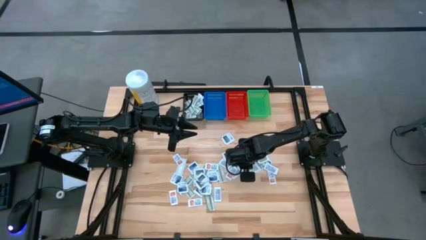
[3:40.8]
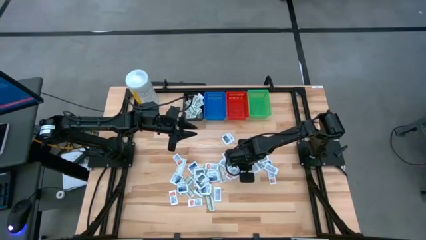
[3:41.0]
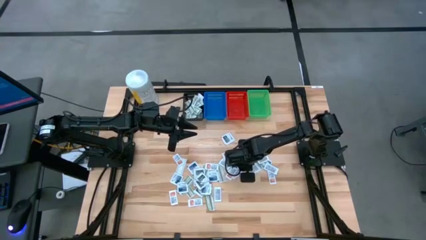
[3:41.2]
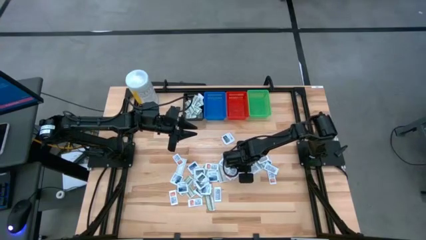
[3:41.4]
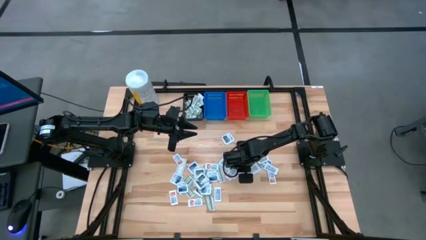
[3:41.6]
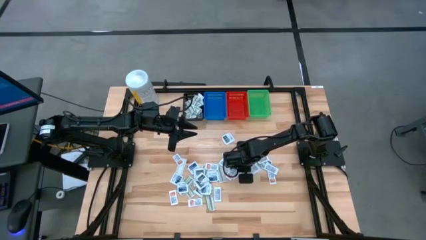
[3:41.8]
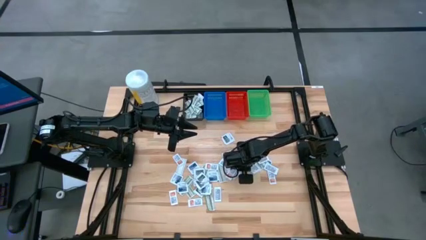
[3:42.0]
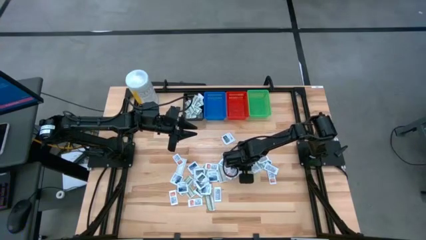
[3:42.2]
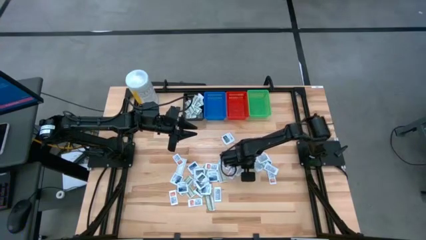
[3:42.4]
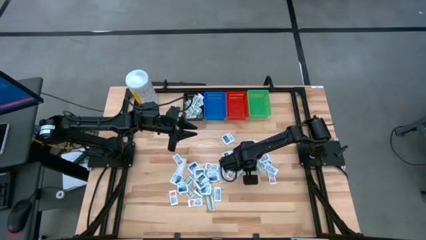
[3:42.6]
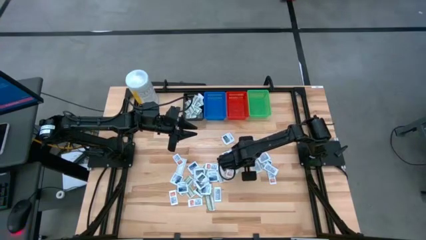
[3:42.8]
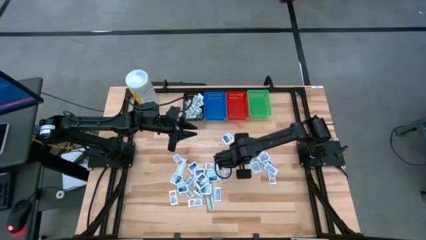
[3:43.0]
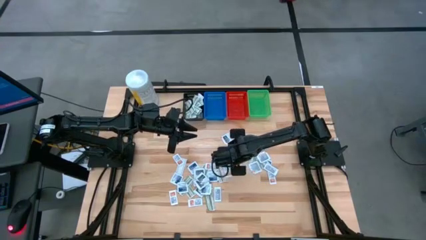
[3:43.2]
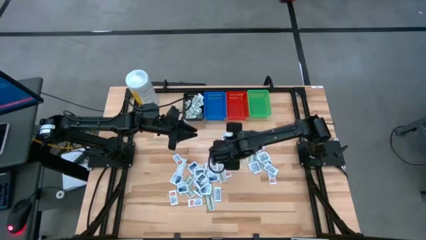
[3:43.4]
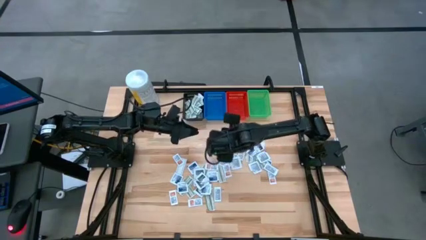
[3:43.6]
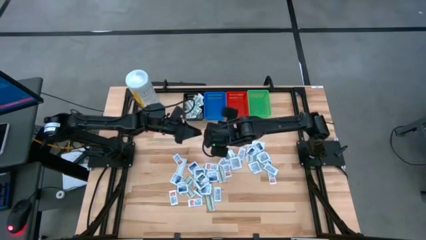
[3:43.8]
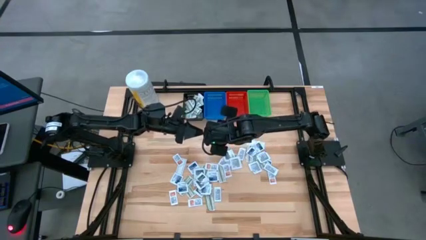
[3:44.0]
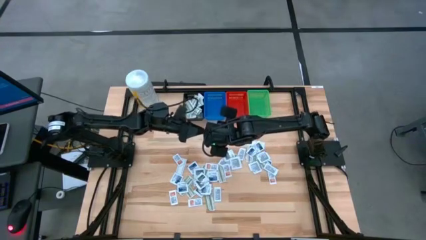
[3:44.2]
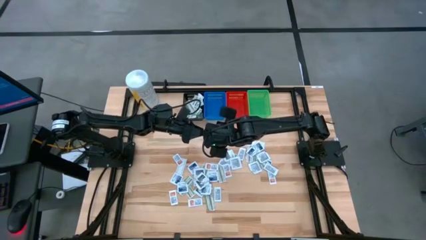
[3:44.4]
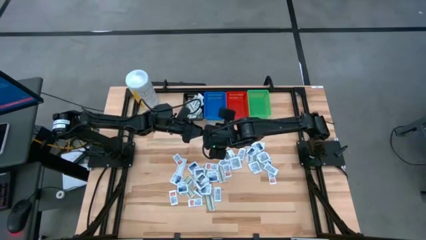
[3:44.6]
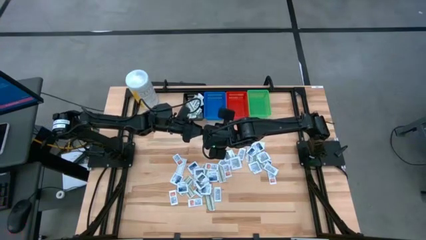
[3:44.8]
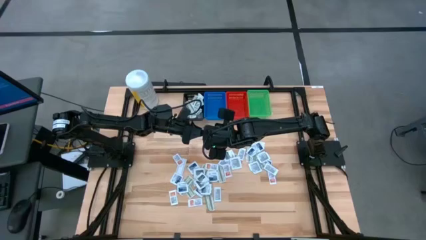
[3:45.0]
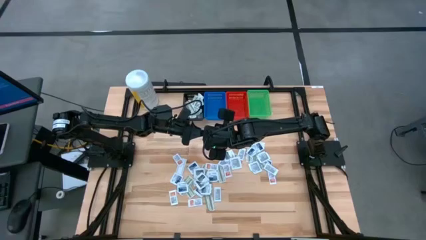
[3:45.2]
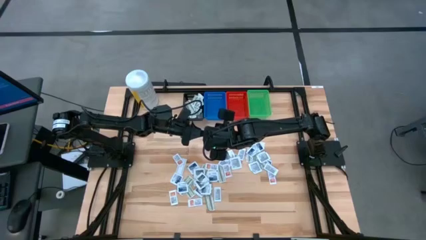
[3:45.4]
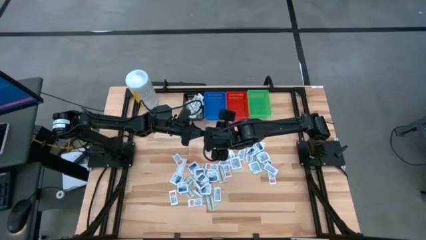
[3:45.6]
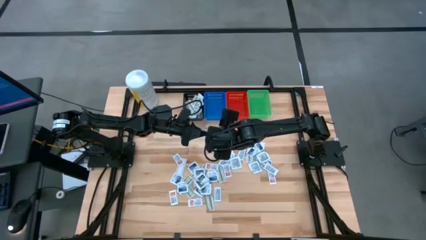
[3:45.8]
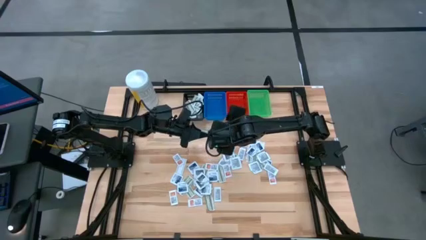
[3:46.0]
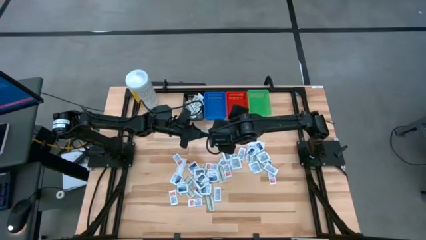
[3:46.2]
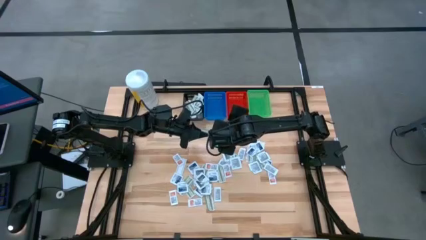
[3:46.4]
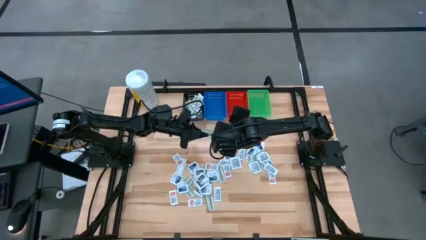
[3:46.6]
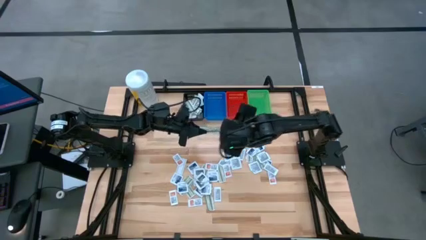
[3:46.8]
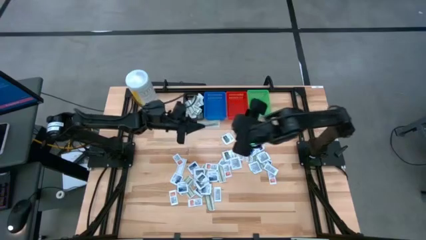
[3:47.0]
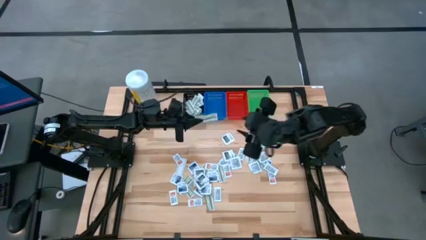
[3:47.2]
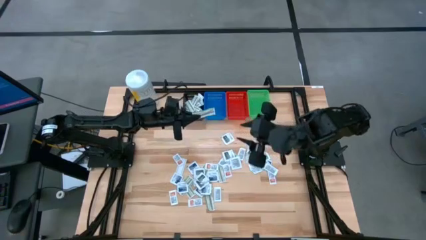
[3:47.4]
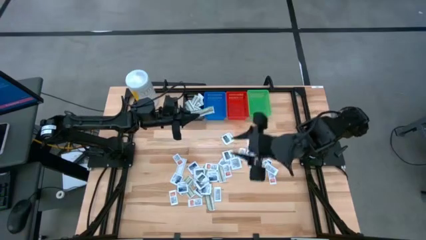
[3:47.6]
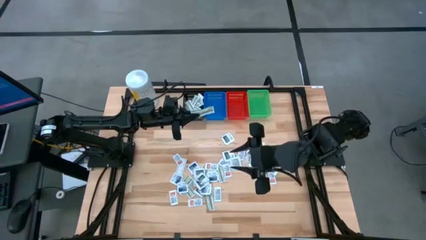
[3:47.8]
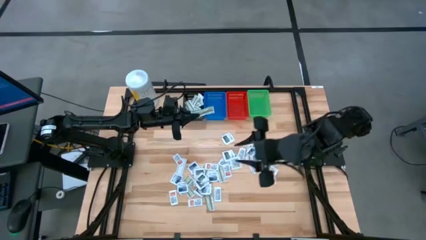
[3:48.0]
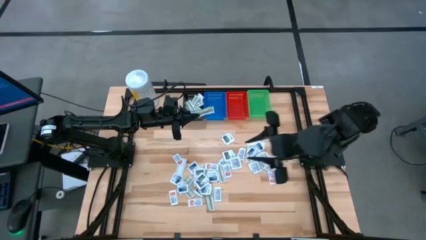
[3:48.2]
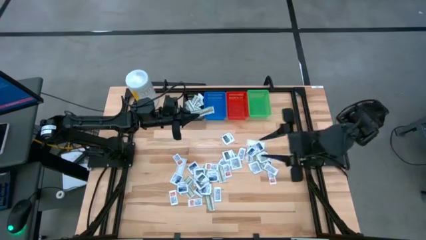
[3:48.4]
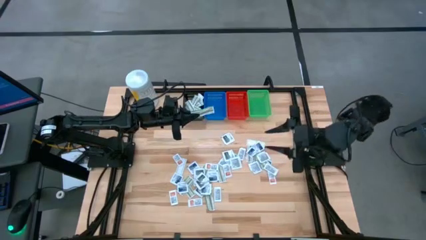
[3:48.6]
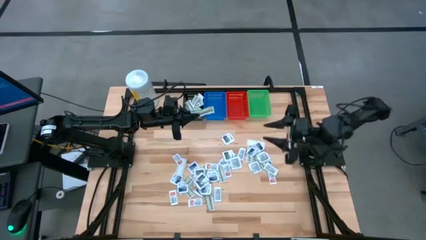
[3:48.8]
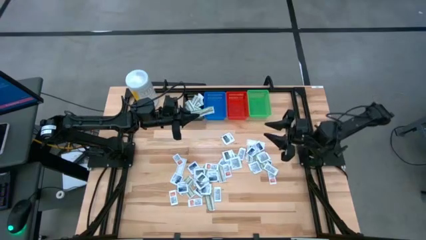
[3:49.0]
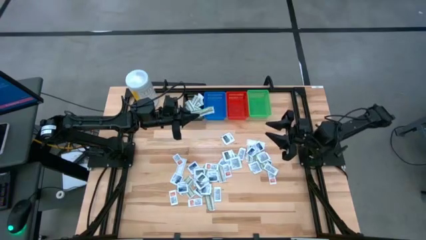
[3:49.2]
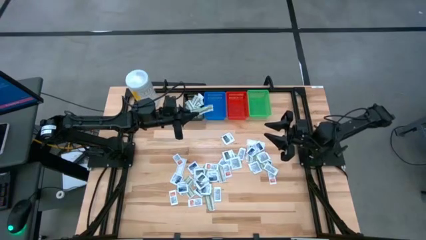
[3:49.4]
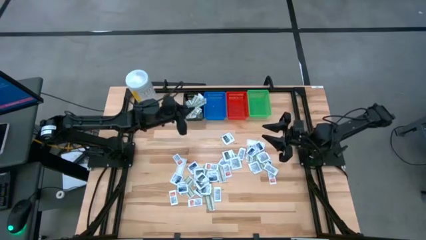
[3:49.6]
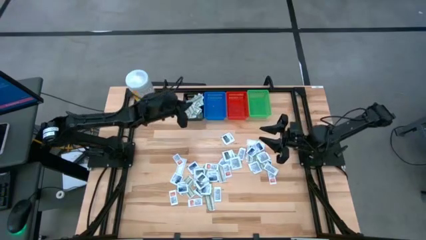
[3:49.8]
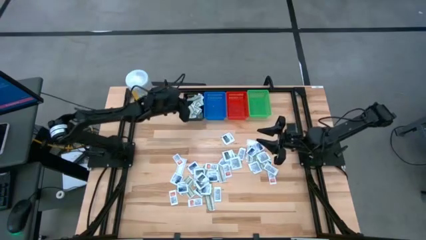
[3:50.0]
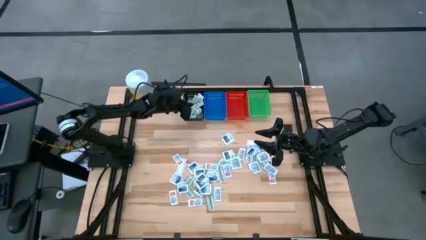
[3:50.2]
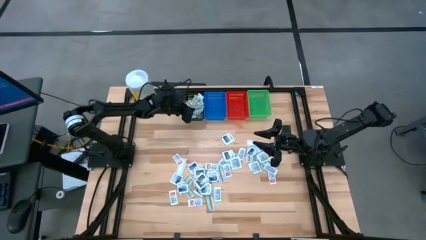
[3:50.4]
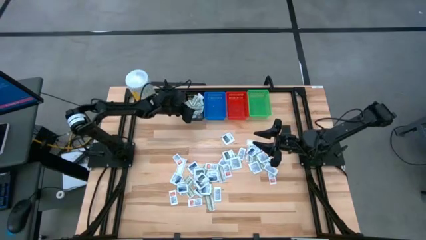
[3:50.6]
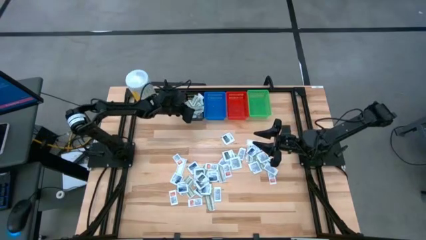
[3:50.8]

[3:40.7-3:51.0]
Task: Pick & Place First Aid Supplies
Put the green bandage pack in the black bin
